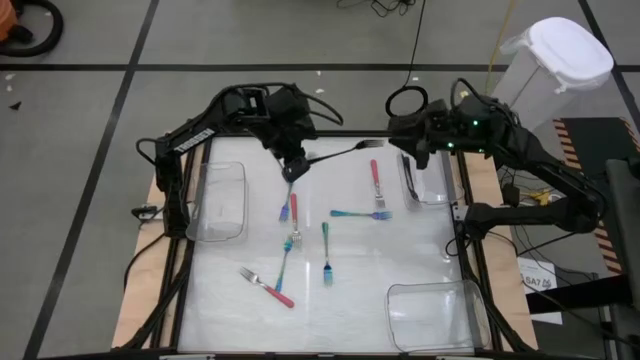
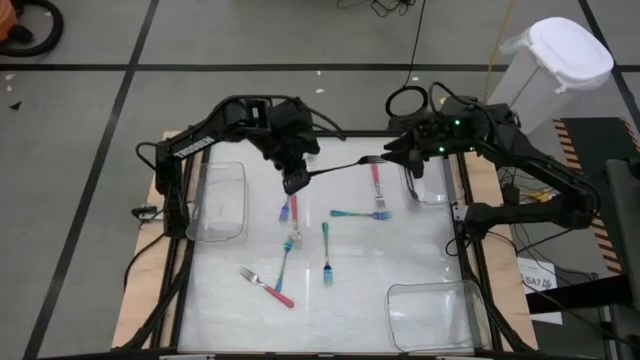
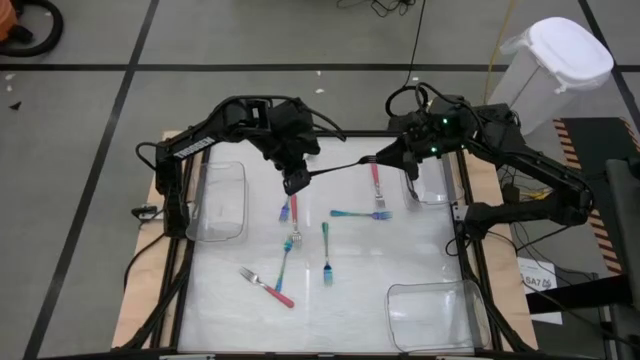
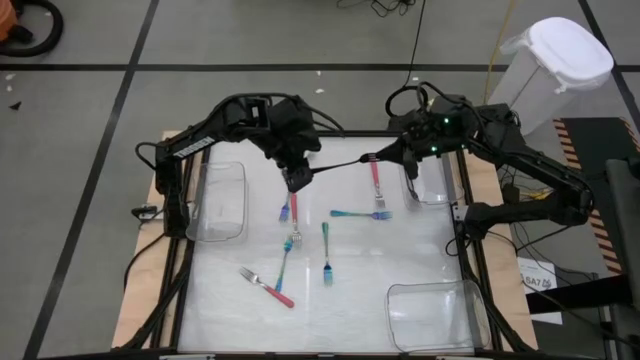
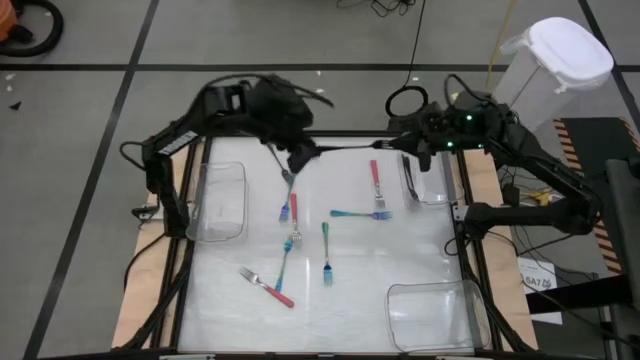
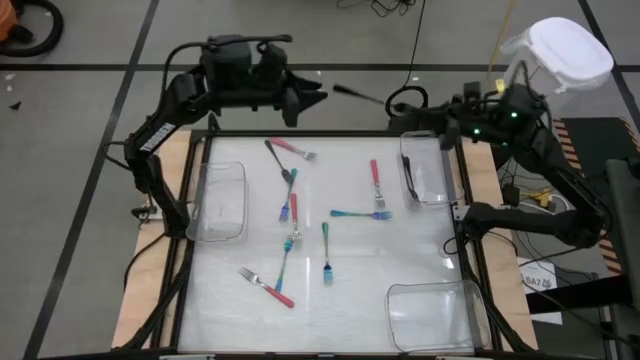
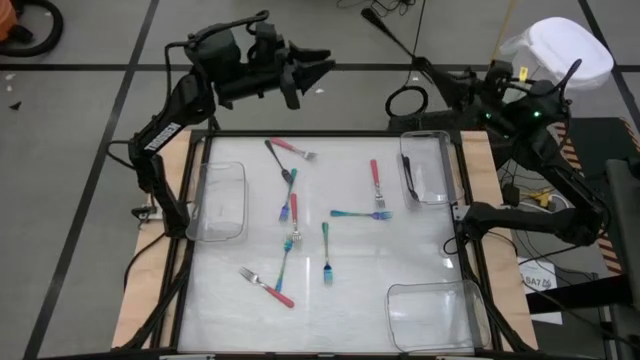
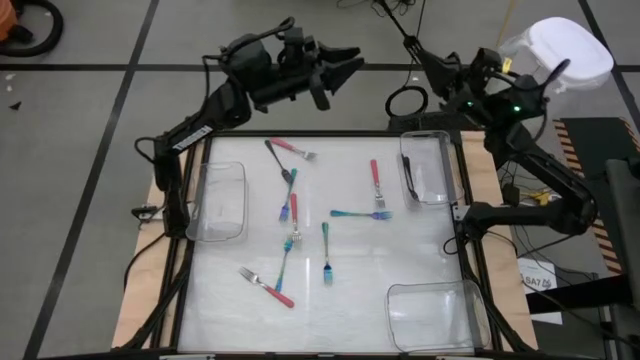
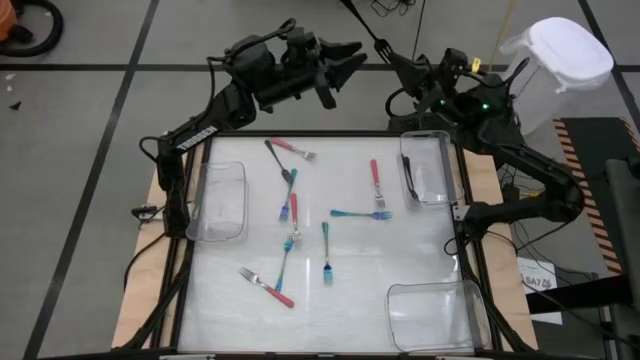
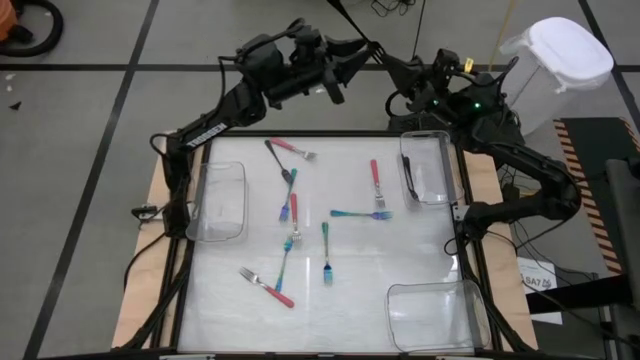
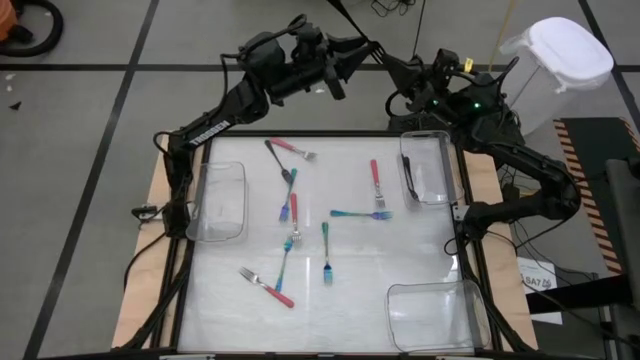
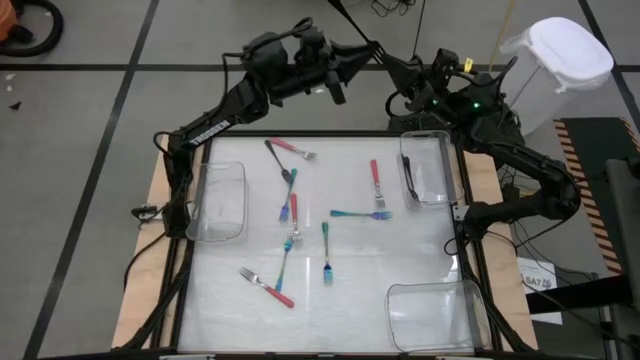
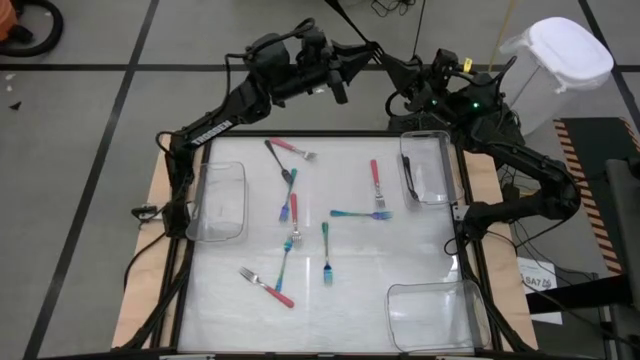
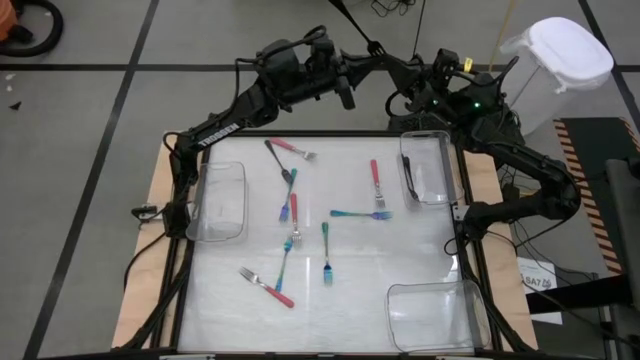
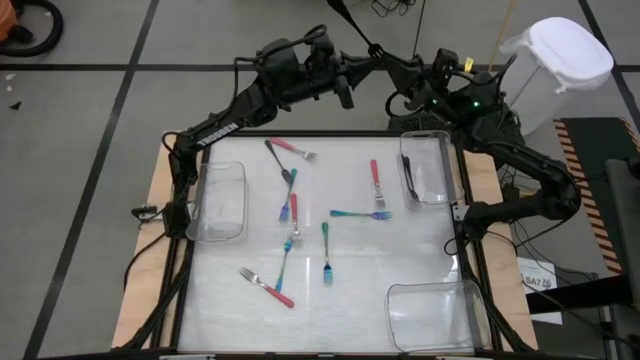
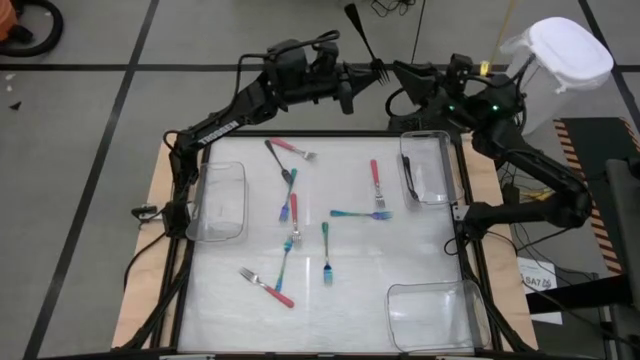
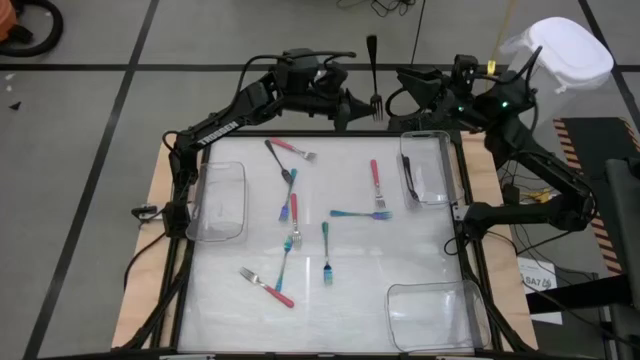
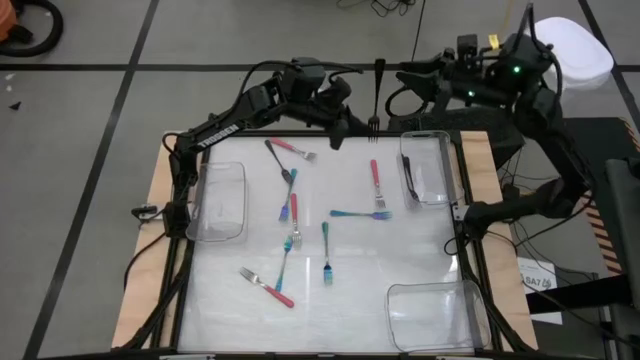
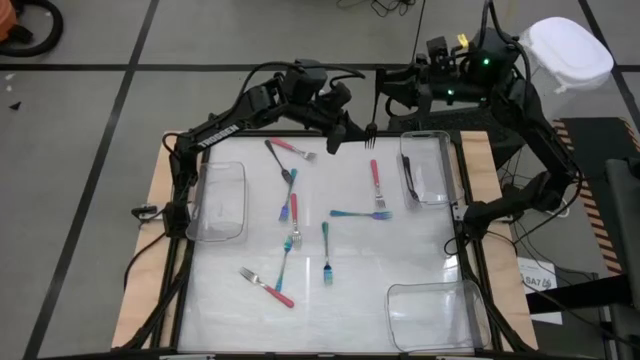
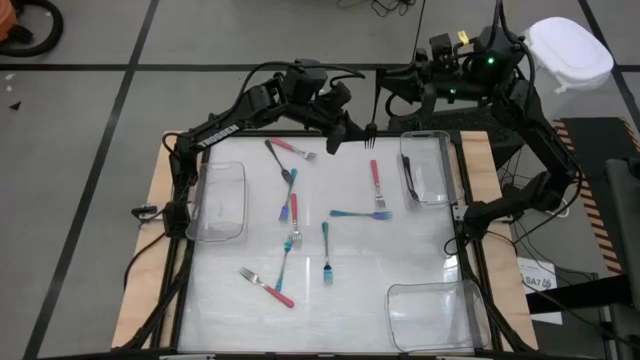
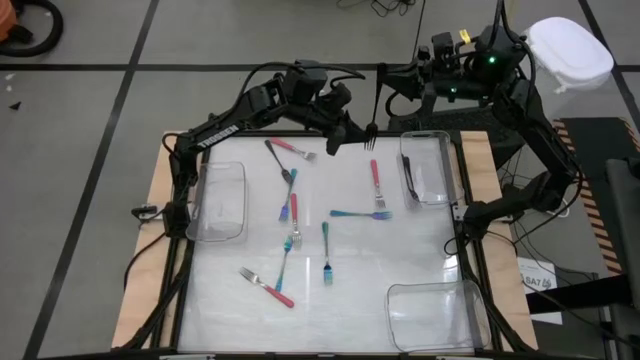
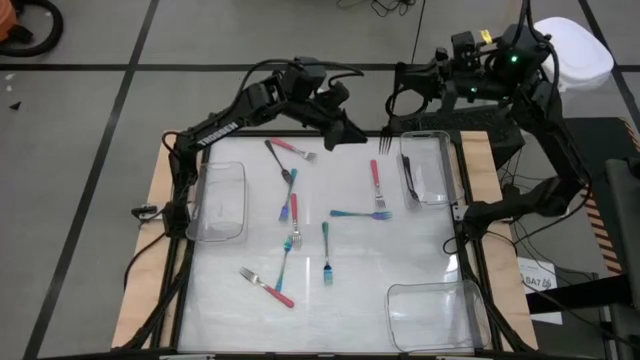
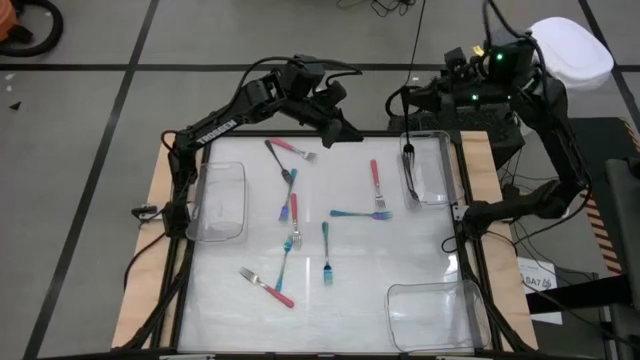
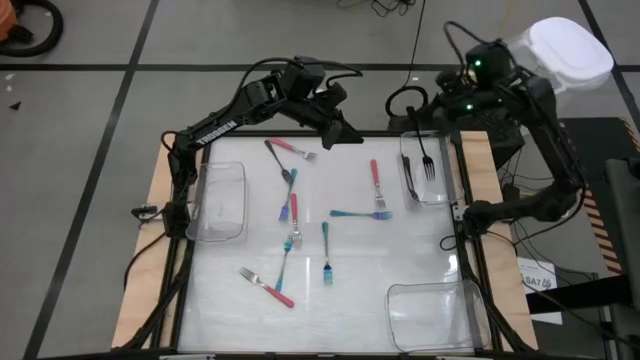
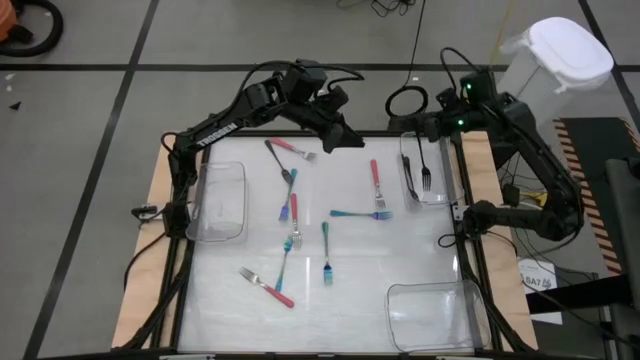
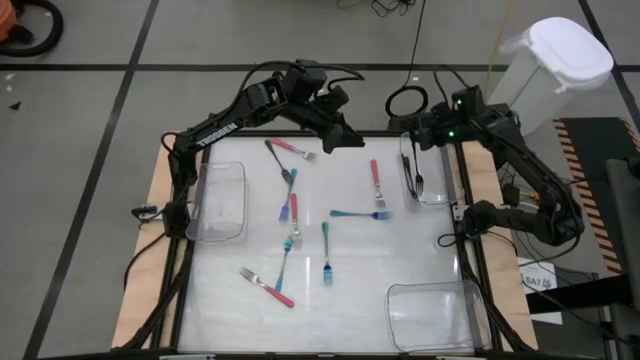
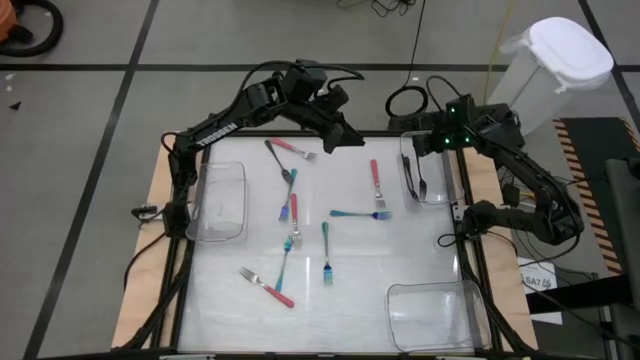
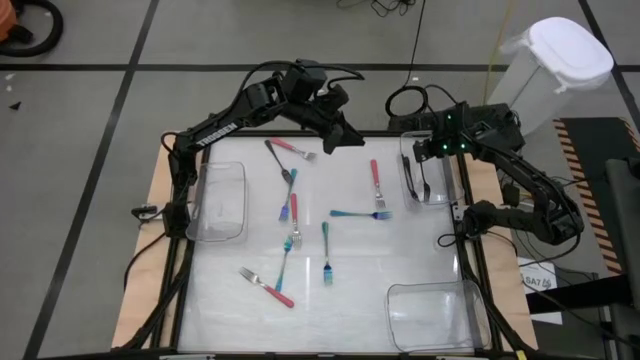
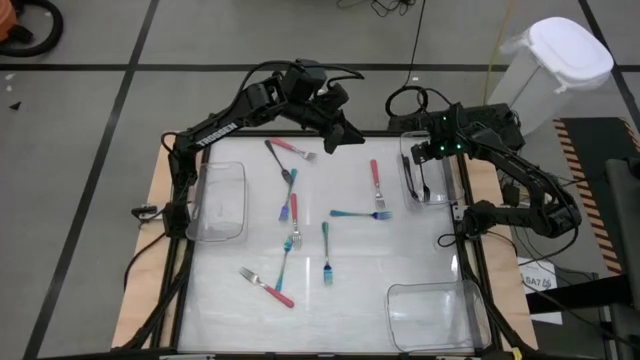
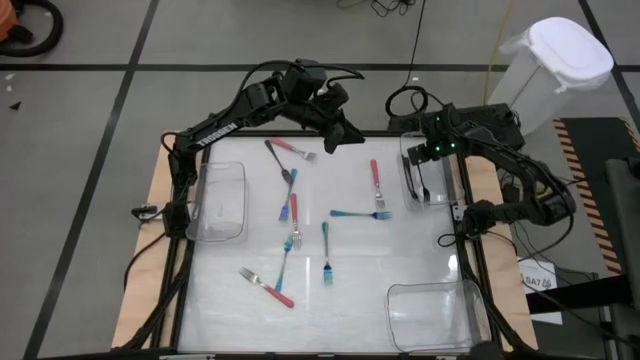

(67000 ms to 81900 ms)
Task: Sort silverware by color (type)
Put the black fork into the top right transparent bin

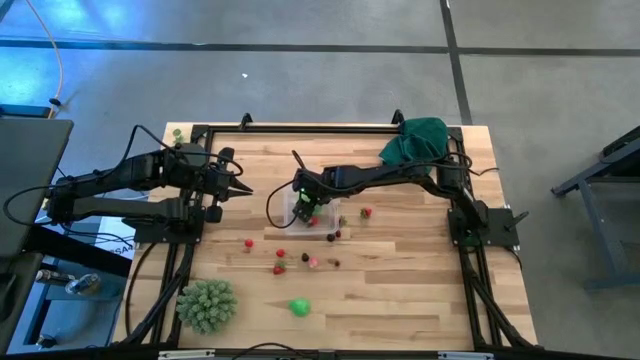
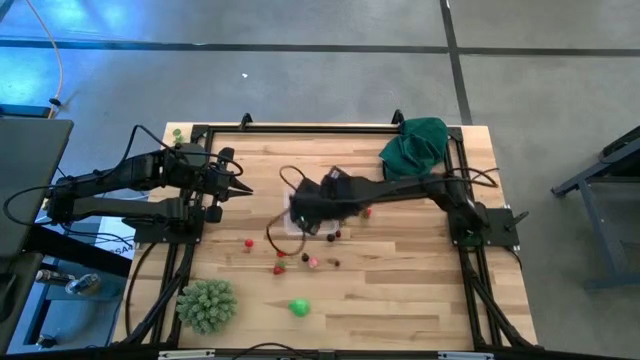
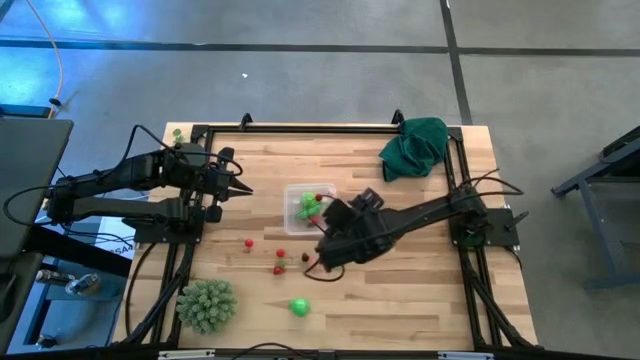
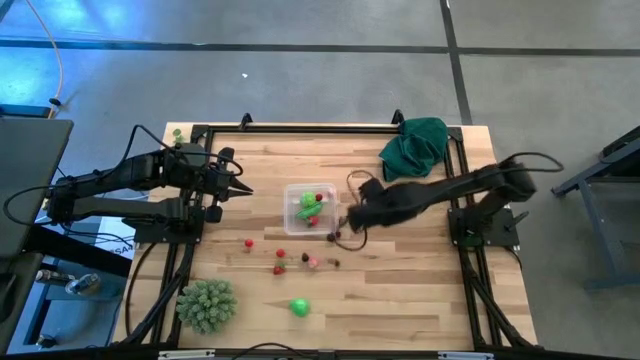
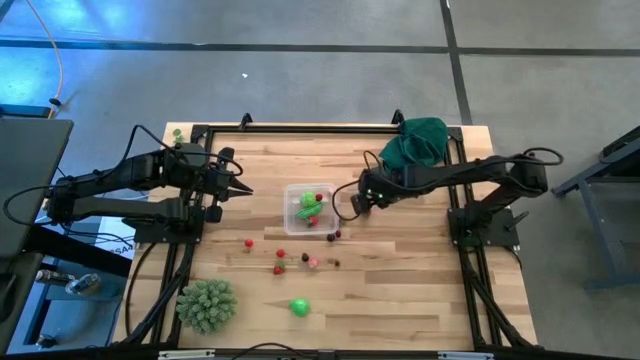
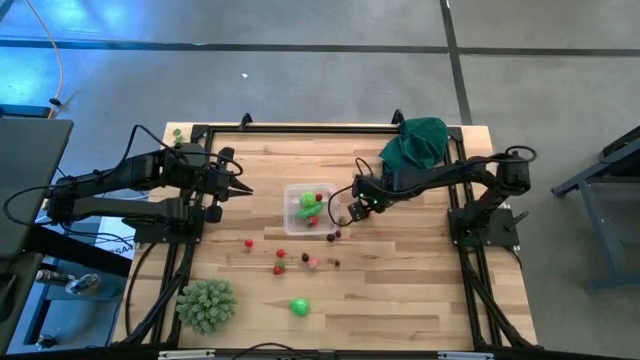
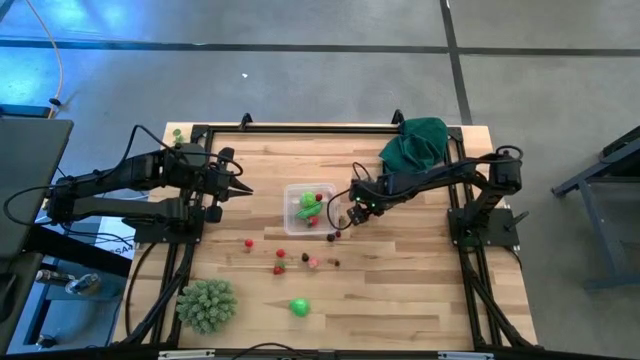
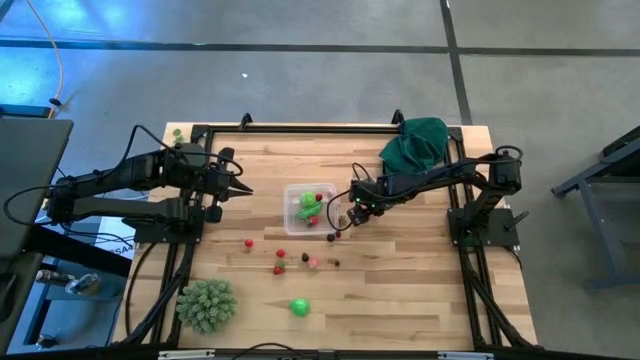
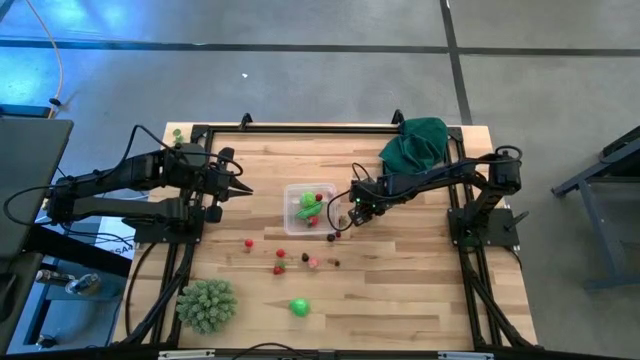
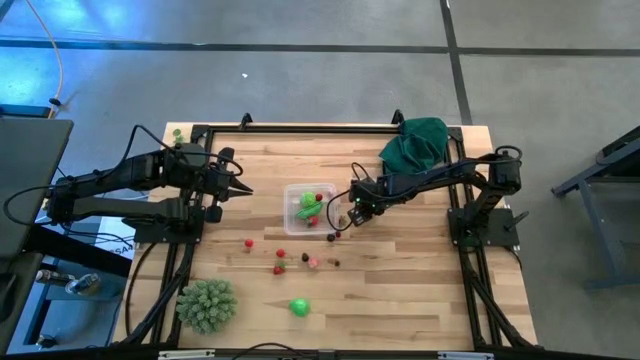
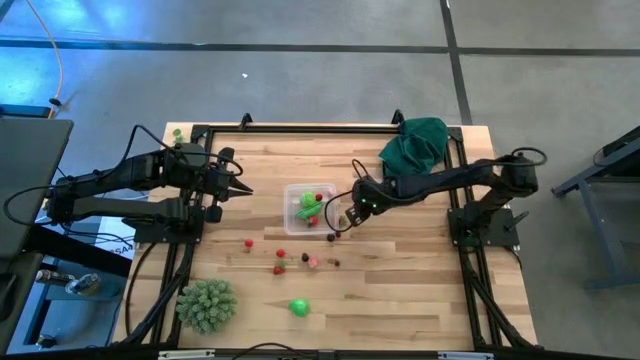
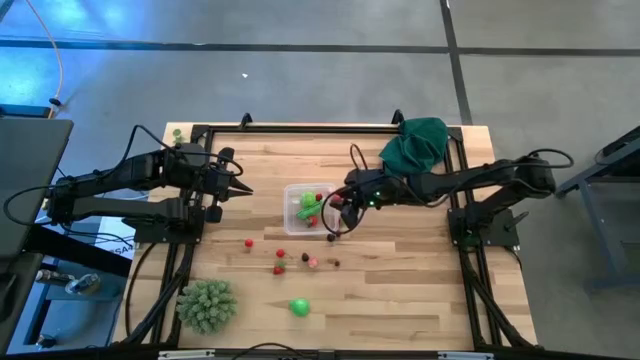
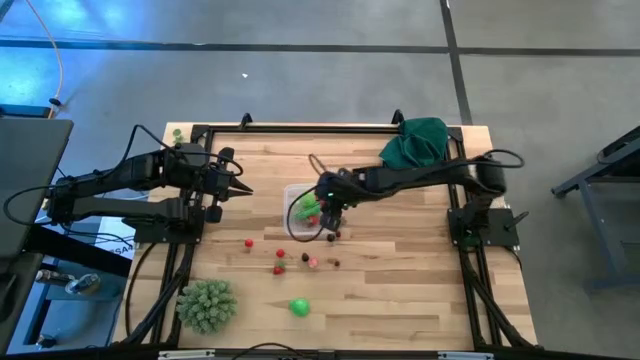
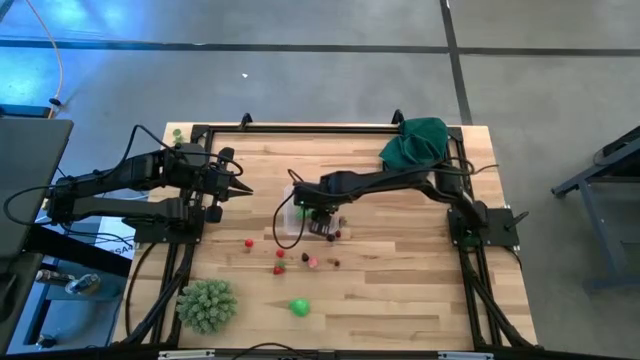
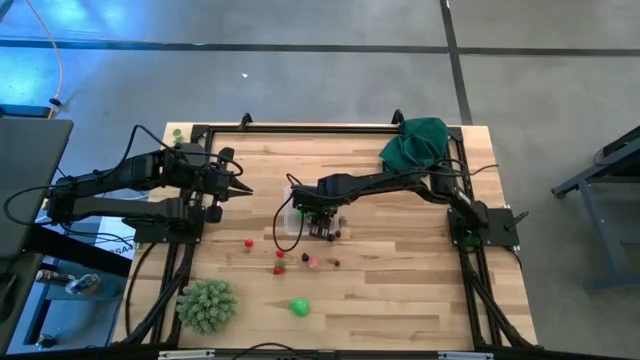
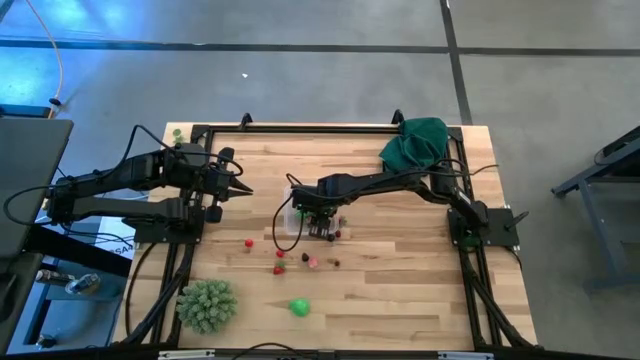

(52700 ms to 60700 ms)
Task: Pick and placing Produce into tupperware
Put the red strawberry into the transparent container
